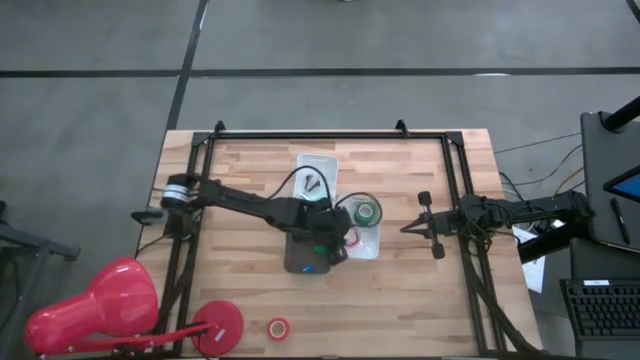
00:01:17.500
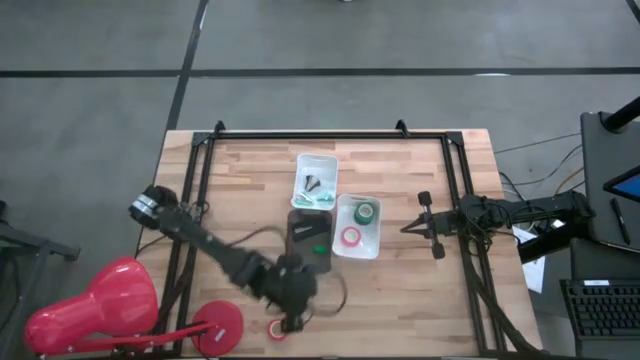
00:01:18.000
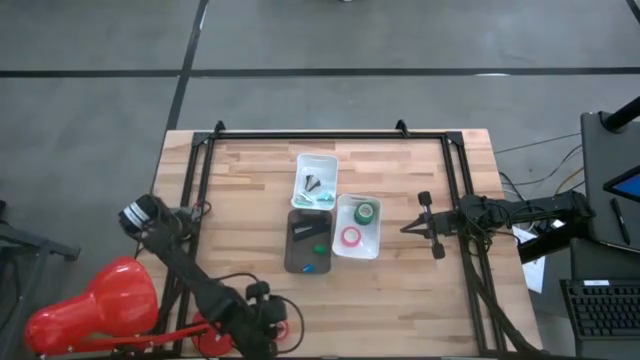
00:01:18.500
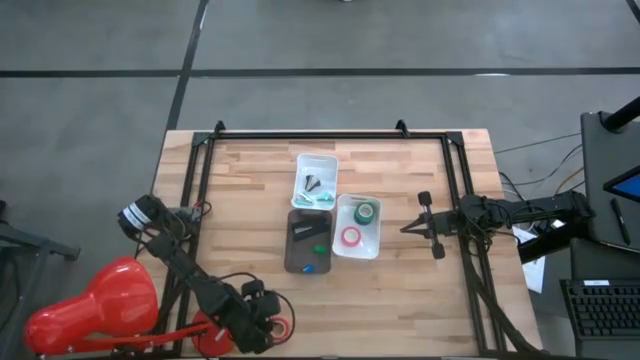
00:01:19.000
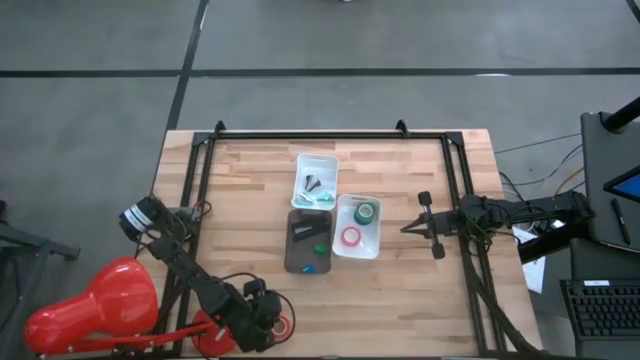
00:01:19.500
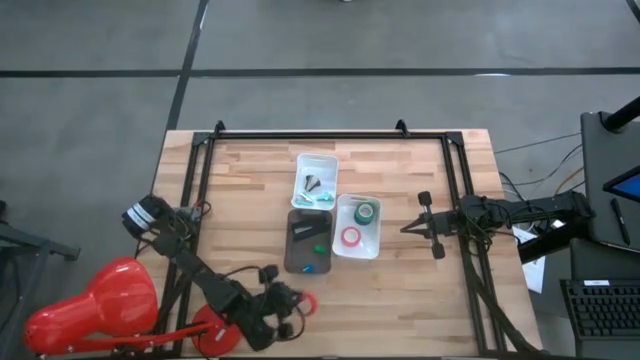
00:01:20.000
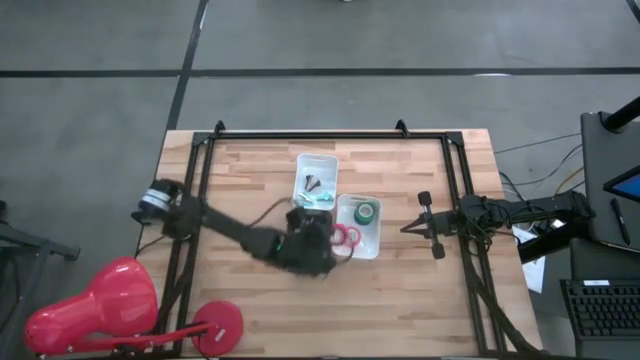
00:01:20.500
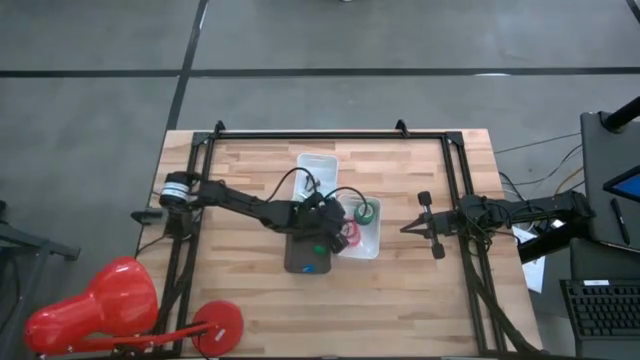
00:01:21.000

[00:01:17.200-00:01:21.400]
Task: Pick and place Stapler, Stapler remover, tape
Put the orange tape into the bottom white bin

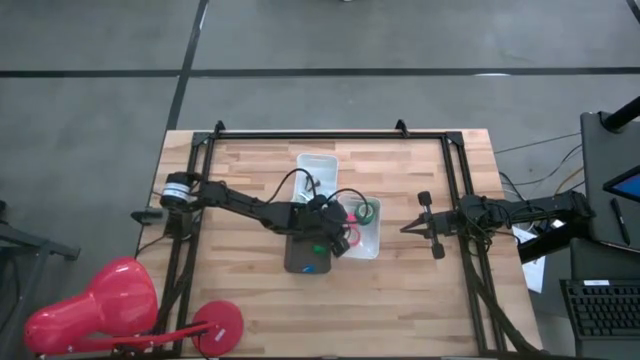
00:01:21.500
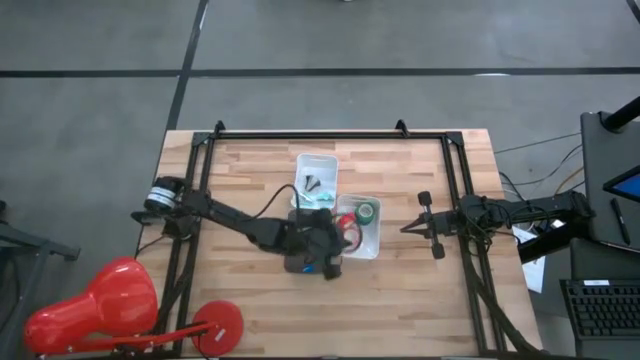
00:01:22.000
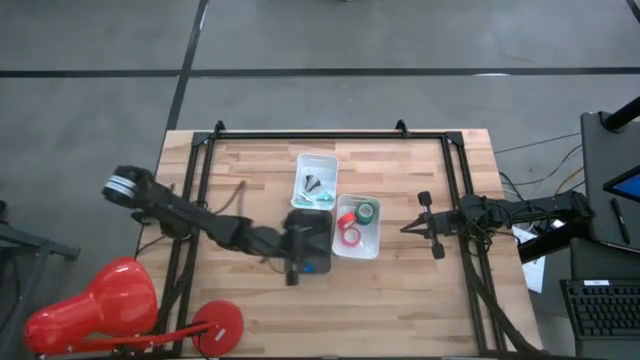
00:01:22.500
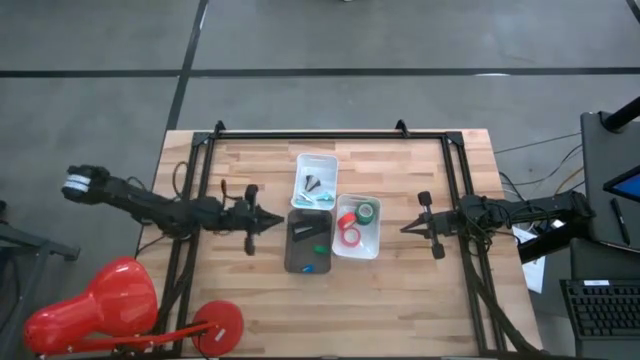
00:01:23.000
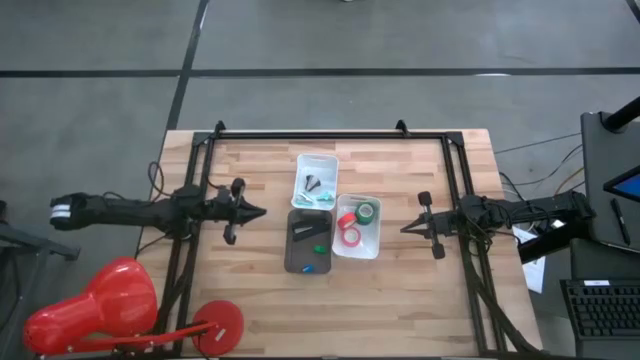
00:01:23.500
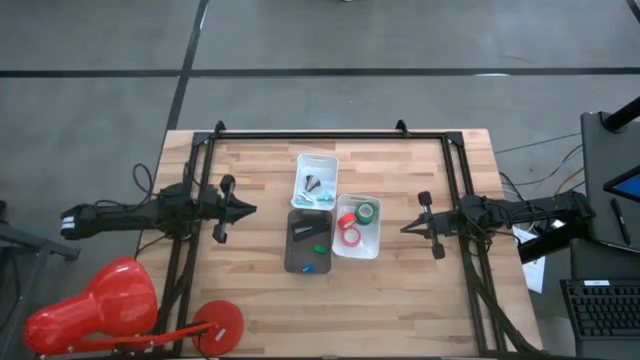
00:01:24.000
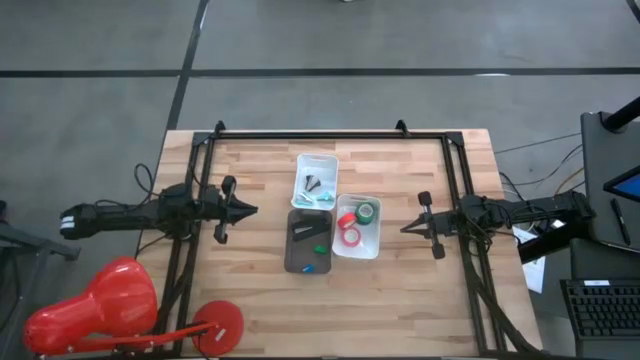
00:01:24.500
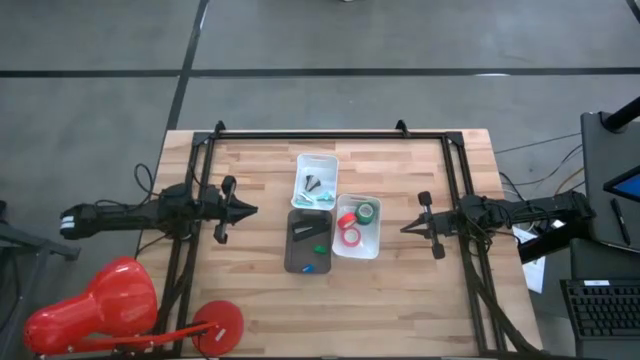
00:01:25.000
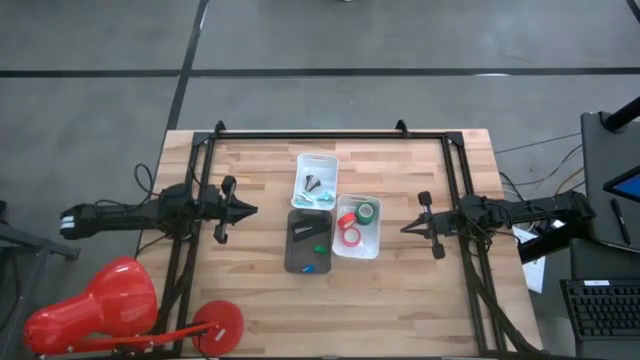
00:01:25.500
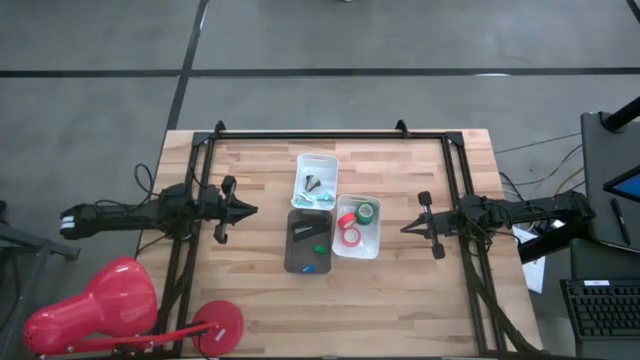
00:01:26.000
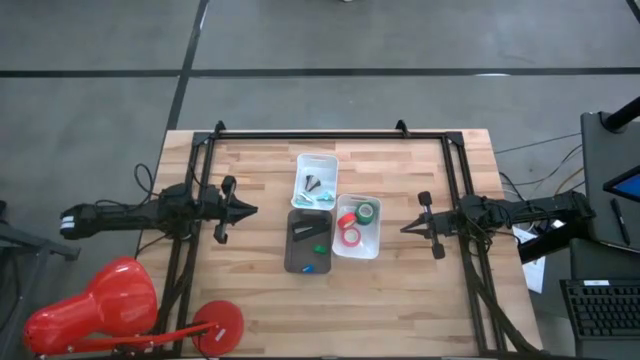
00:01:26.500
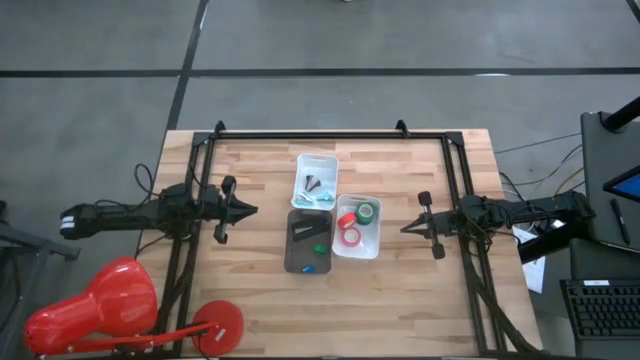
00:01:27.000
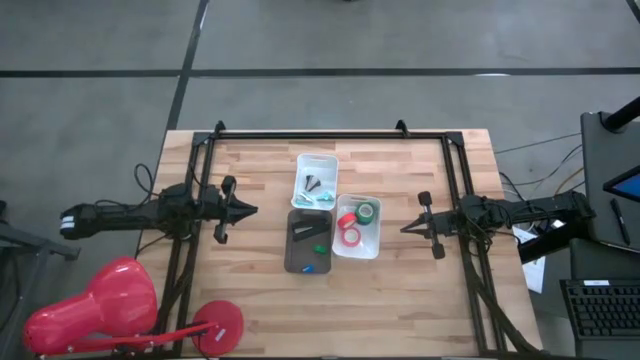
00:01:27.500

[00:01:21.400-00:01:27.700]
Return to Home Position

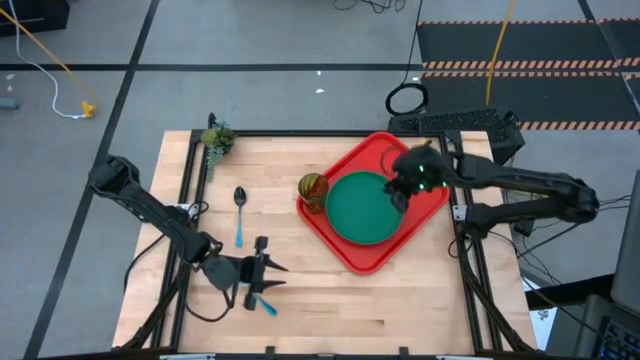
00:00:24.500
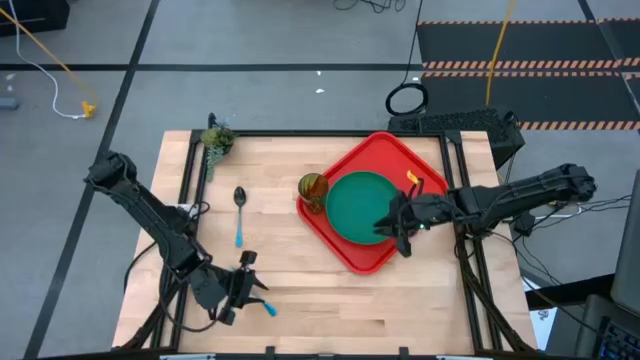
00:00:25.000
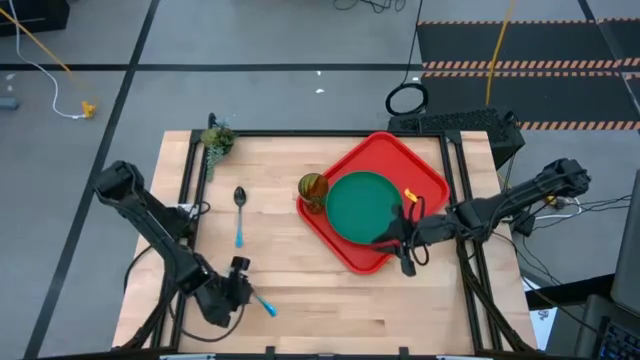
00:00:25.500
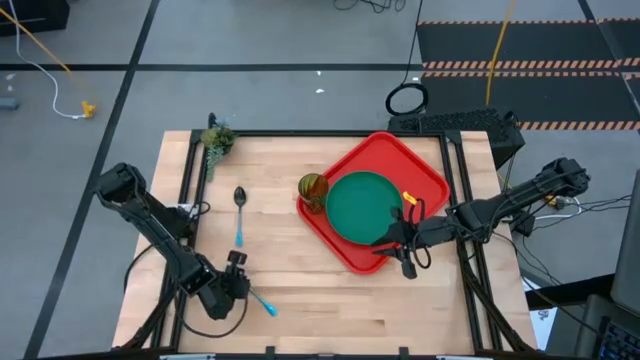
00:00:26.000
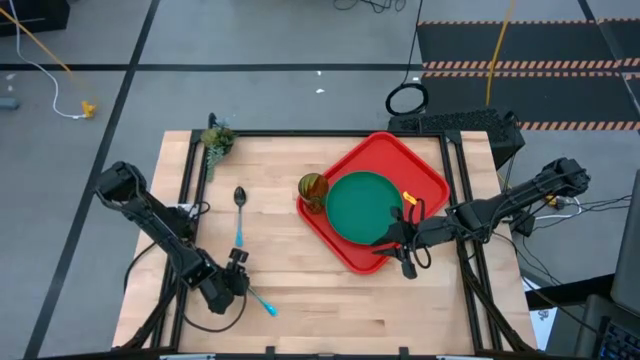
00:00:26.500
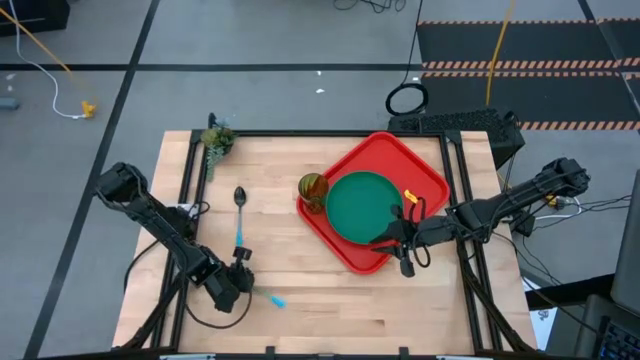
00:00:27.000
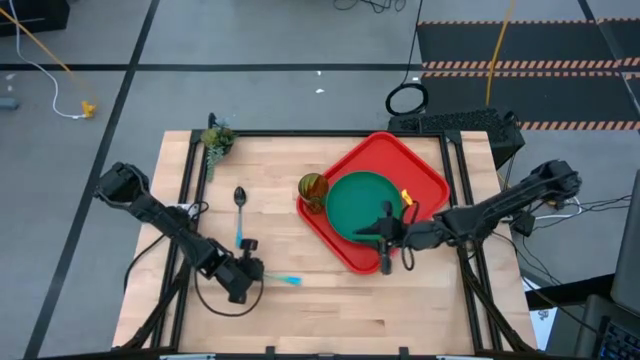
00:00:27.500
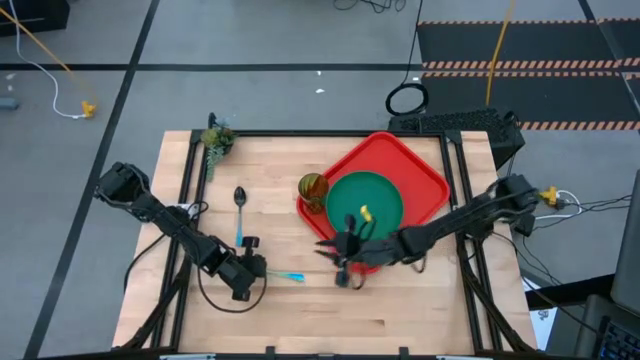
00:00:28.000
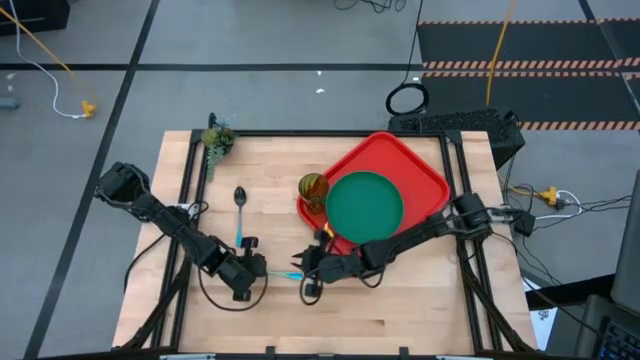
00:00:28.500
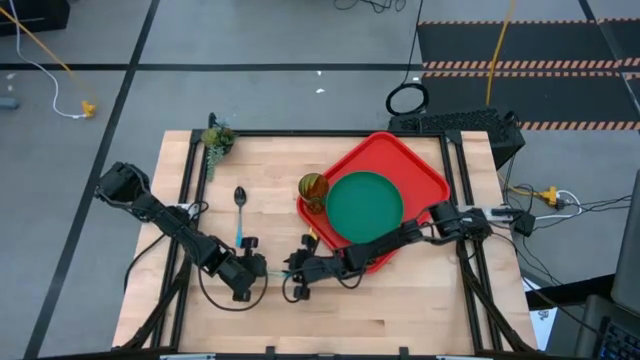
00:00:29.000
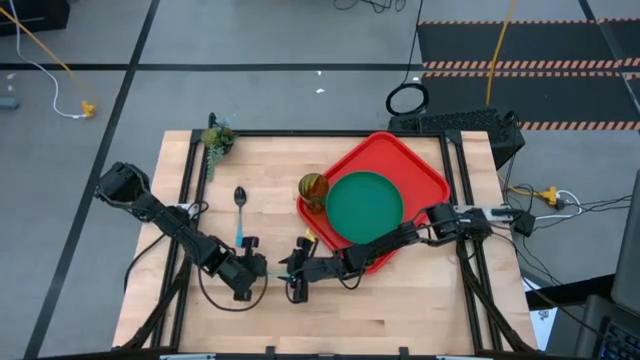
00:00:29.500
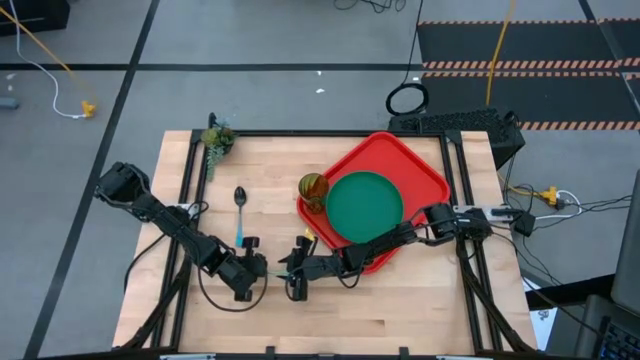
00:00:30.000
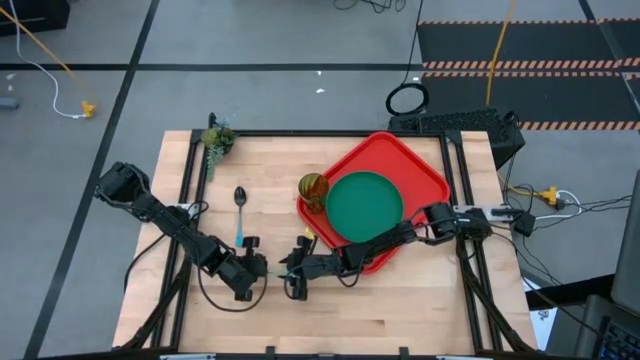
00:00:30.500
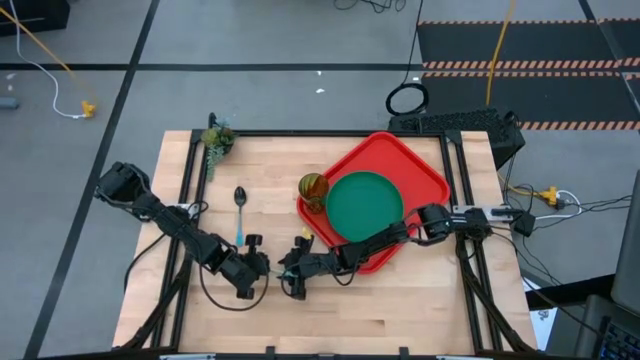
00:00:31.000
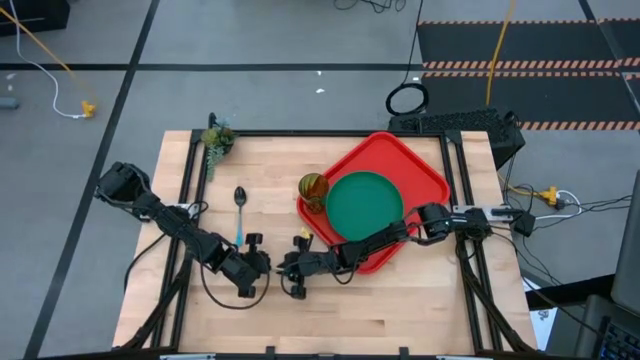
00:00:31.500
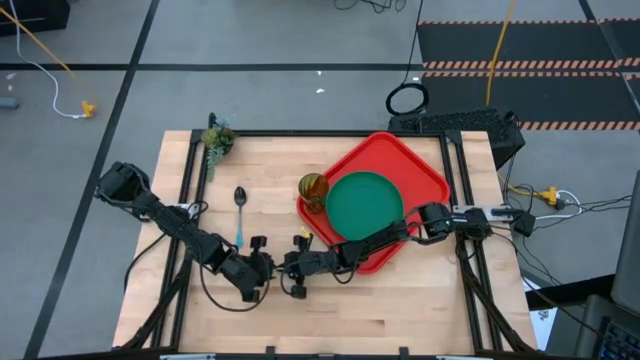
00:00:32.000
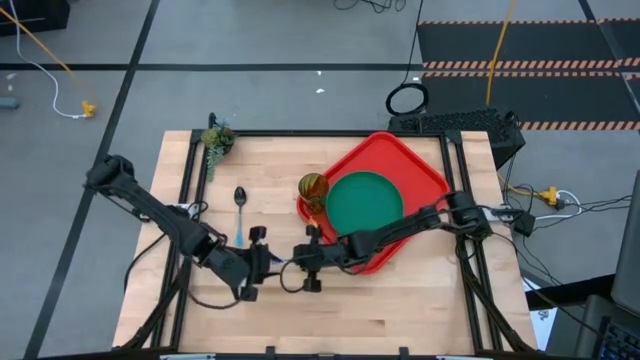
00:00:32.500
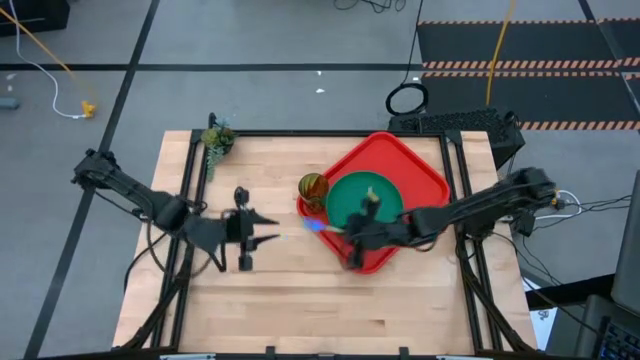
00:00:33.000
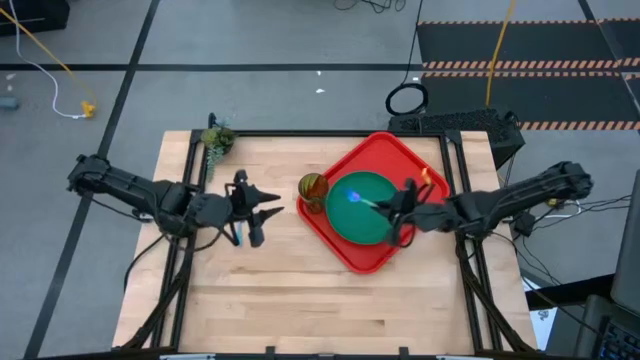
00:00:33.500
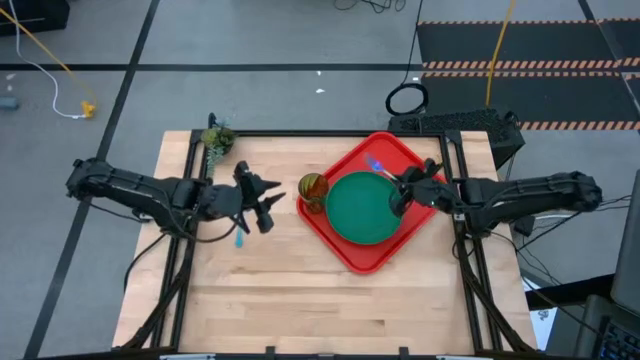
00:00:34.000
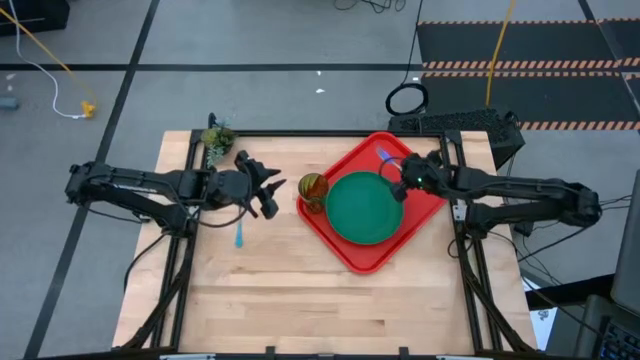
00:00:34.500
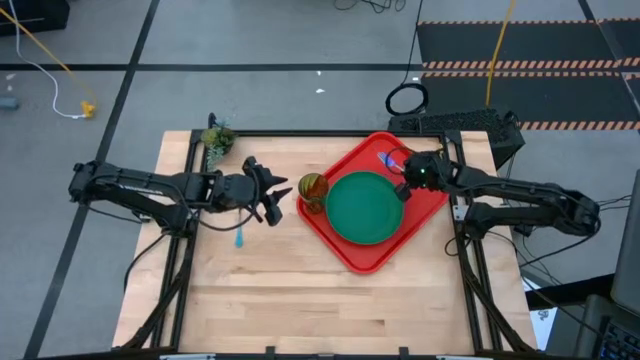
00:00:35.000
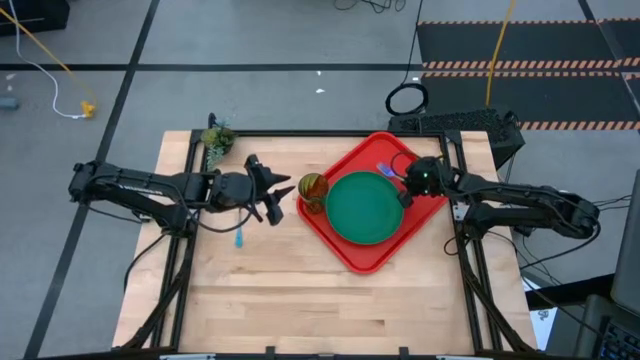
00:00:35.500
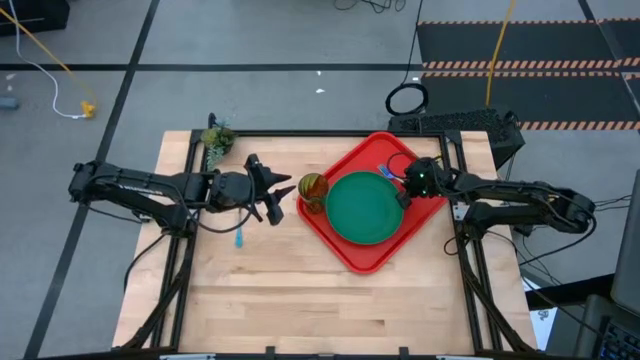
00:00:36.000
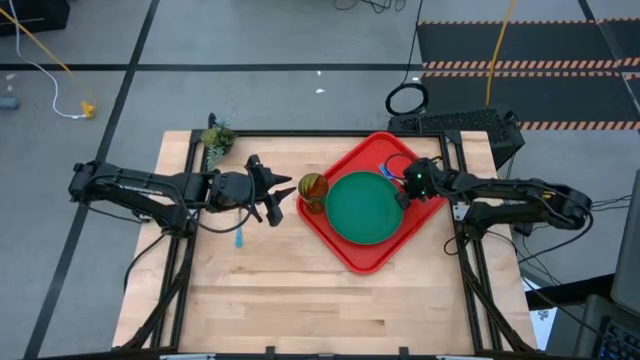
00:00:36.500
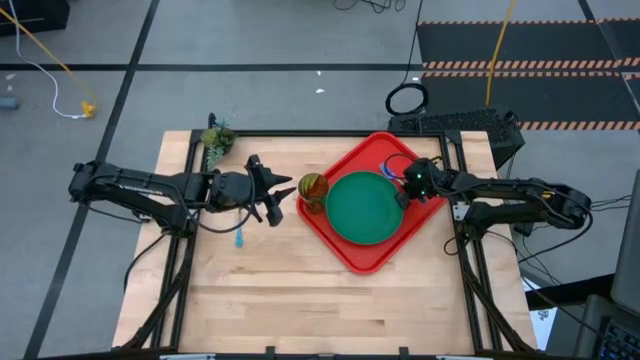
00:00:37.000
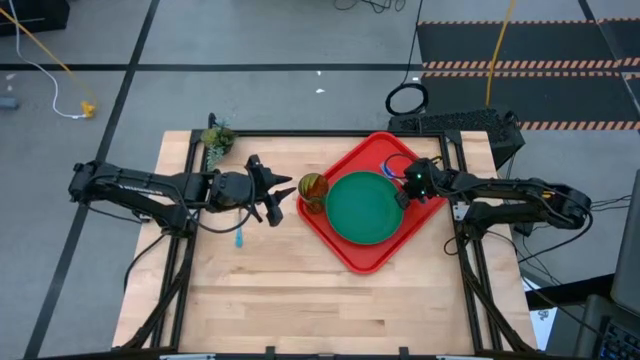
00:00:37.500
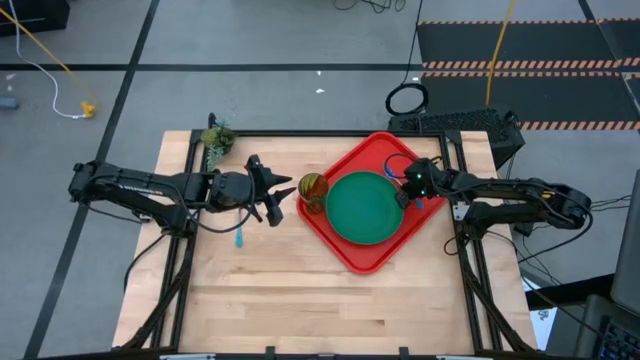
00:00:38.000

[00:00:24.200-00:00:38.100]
Task: Pick and place plate/cup/fork/spoon on tray
Put the iridescent fork on the red serving tray
